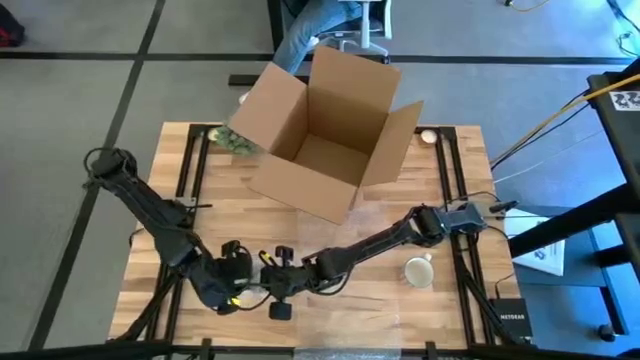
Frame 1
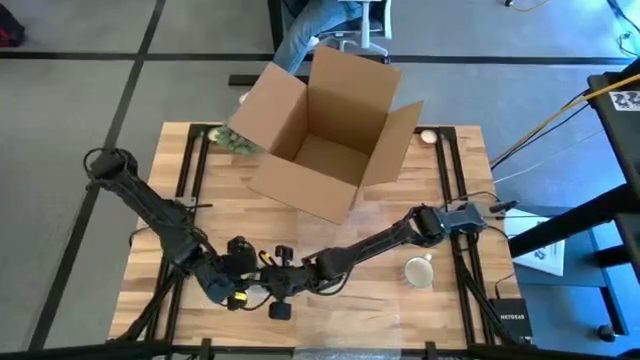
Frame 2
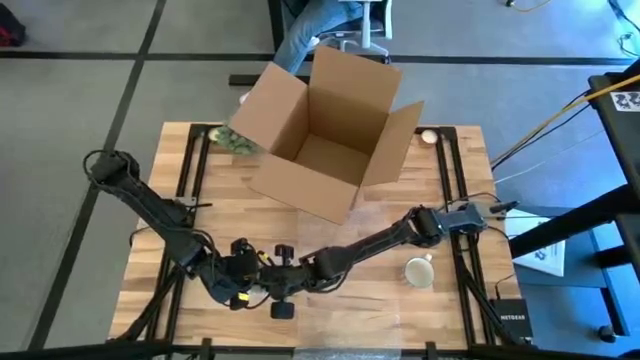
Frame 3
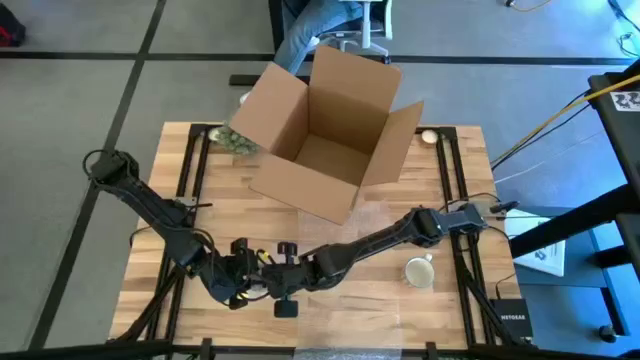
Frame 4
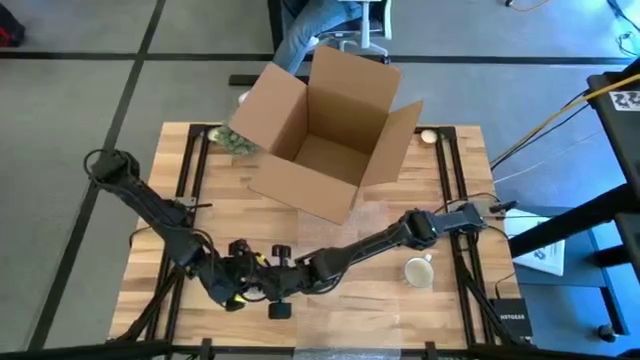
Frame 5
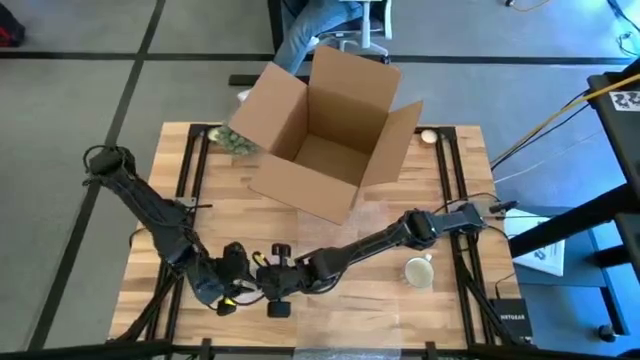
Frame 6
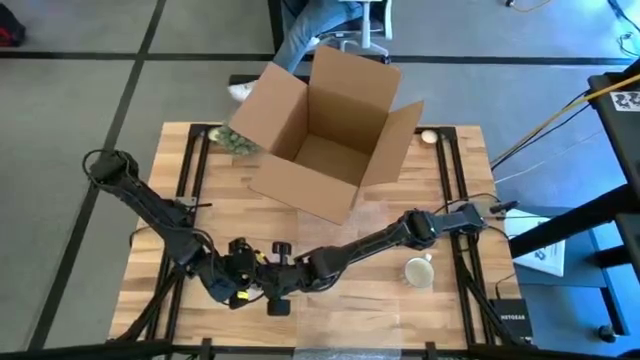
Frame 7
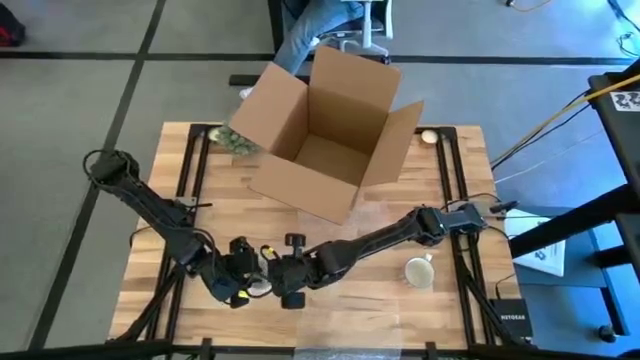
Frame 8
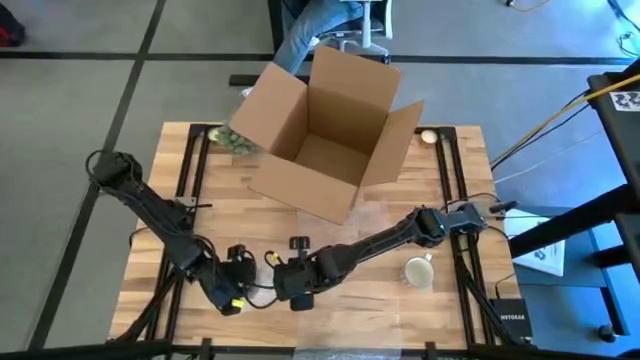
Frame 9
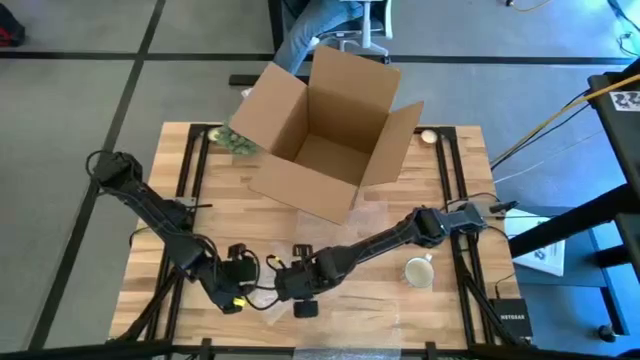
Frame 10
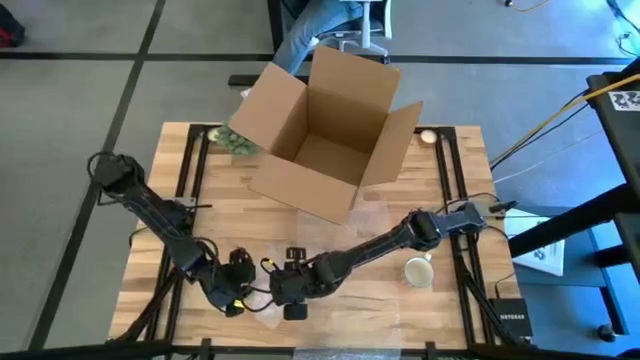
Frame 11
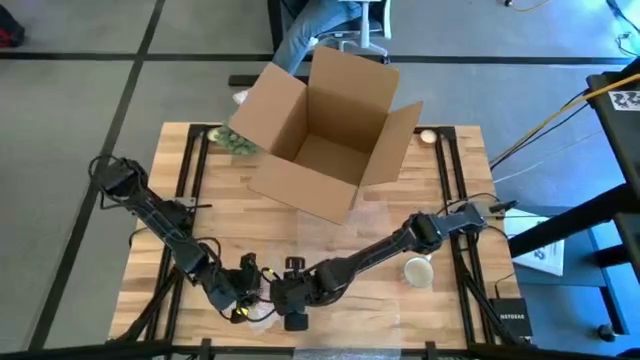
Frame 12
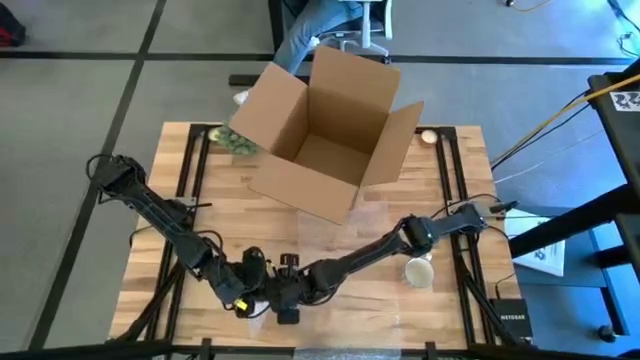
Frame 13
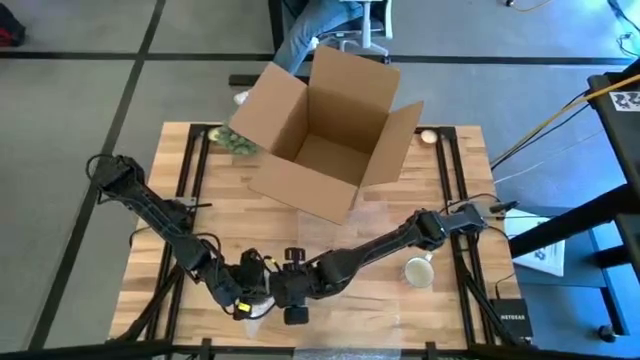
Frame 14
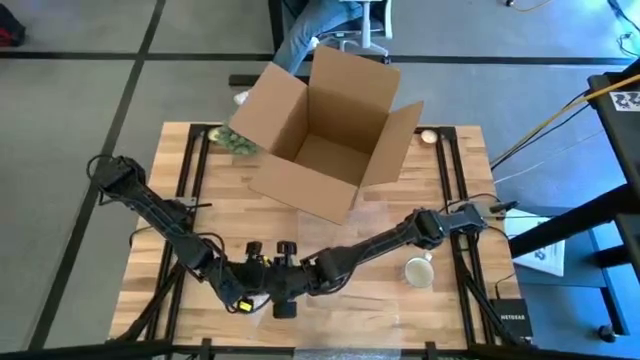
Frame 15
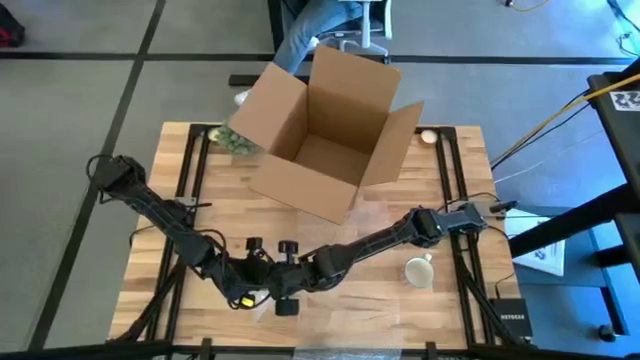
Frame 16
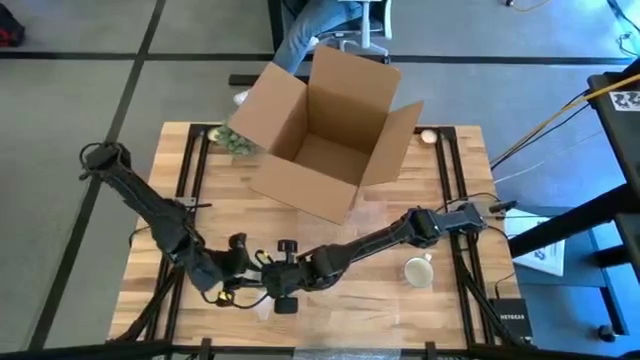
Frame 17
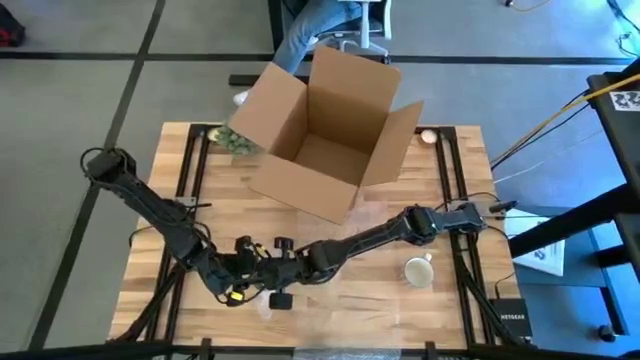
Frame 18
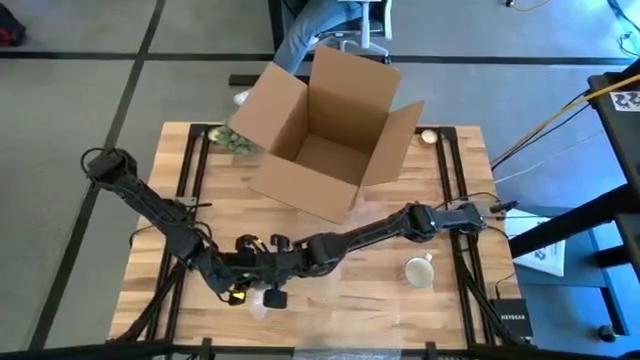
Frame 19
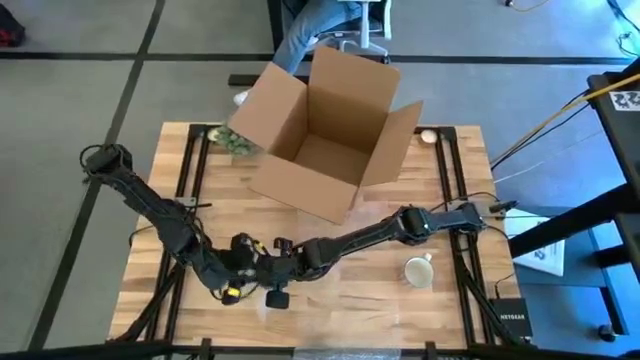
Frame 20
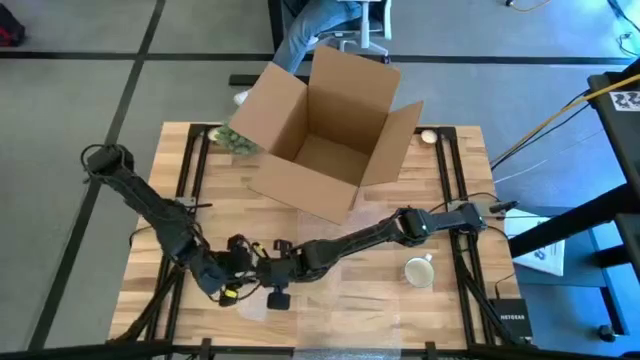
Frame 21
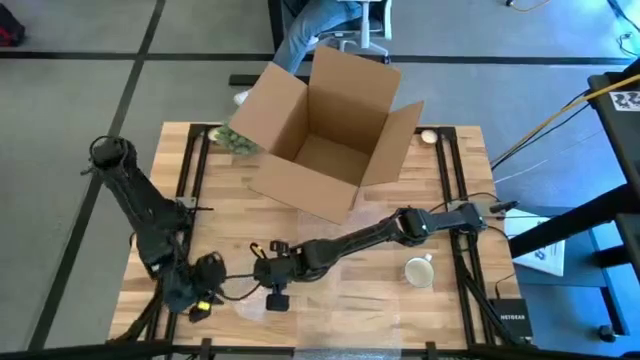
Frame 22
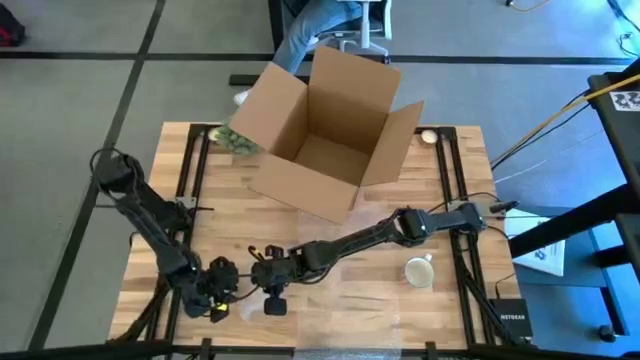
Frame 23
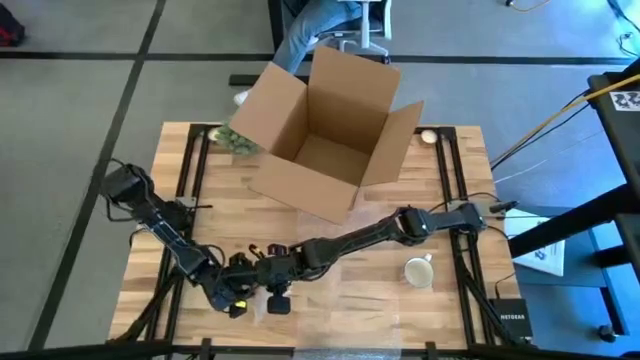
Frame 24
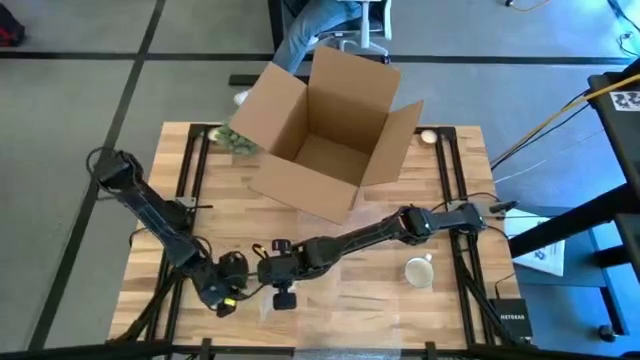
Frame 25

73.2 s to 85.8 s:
Task: wrap mug
Wrap the orange mug with the left bubble wrap

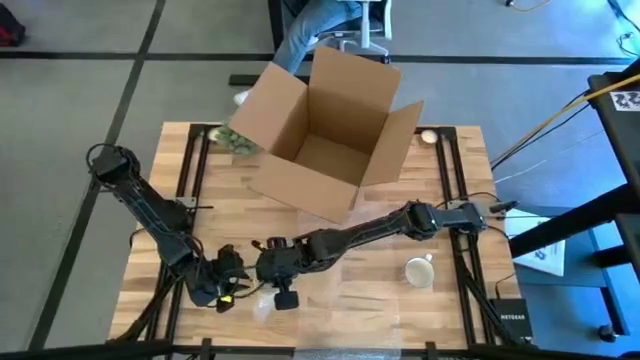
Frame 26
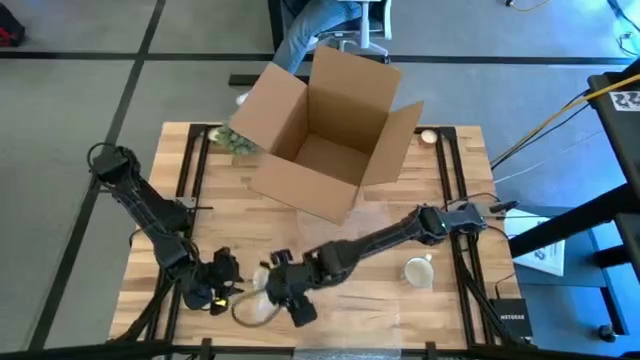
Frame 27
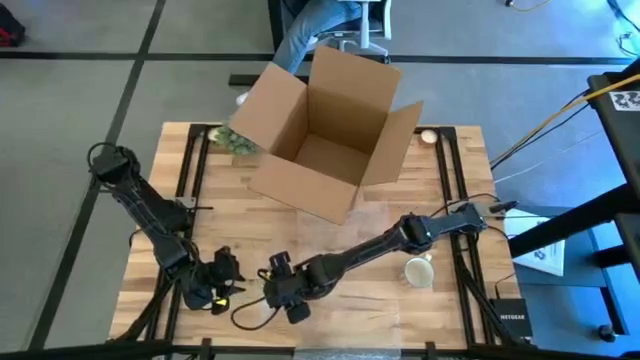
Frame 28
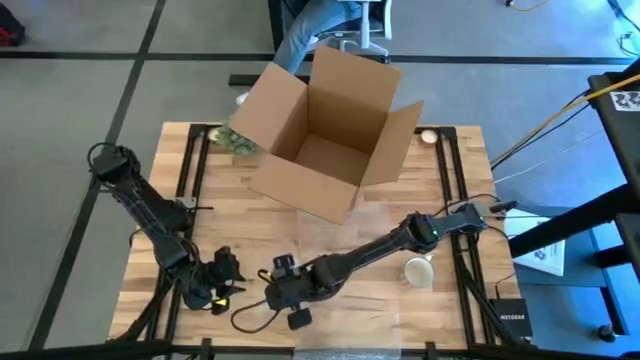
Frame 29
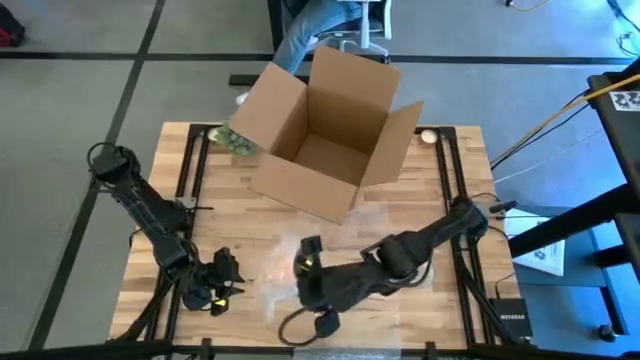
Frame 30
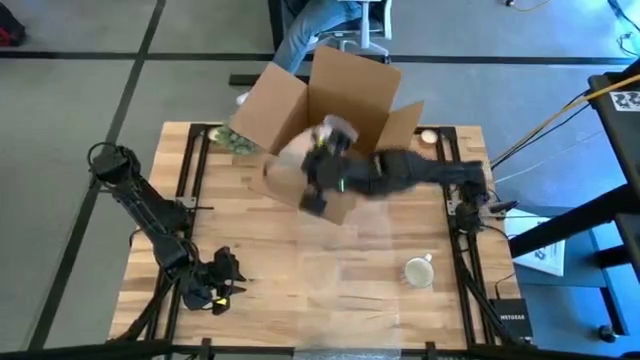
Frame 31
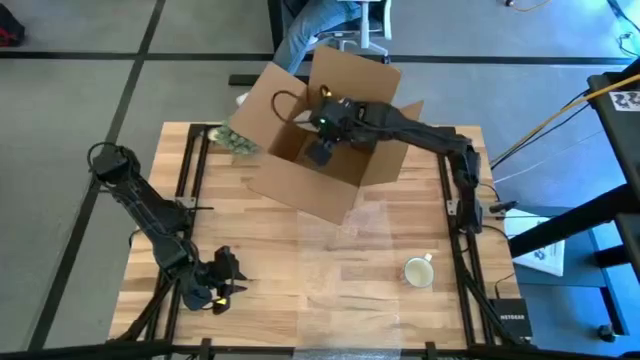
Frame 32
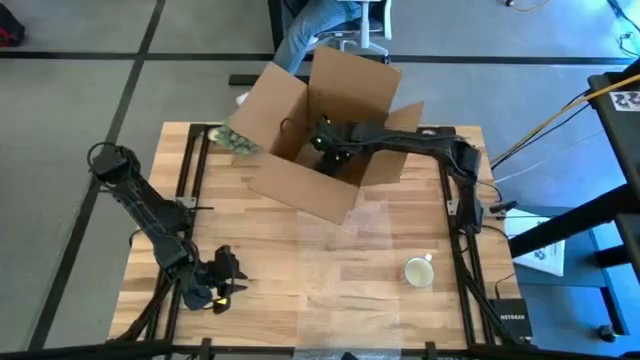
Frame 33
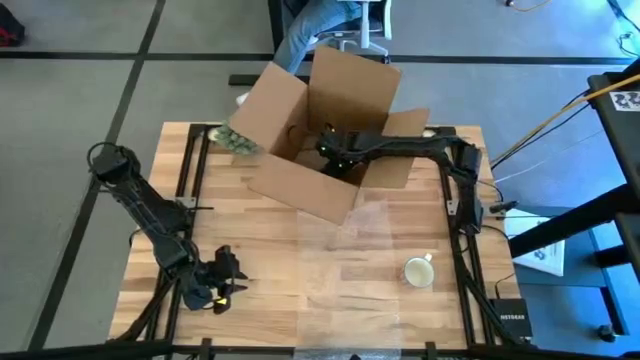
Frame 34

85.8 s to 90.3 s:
Put the wrapped orange mug into the box

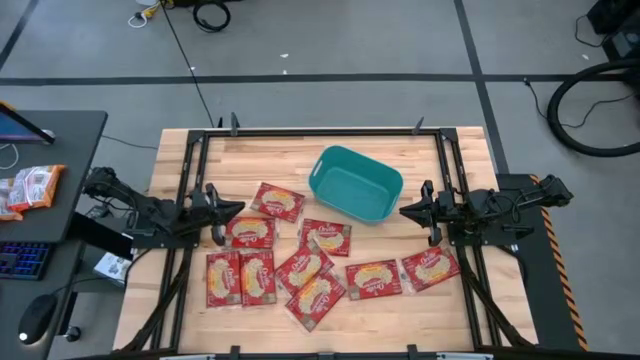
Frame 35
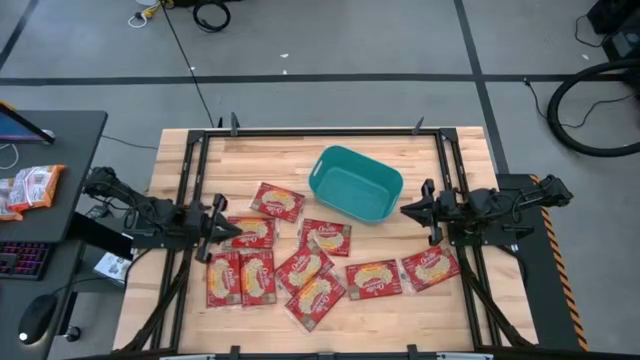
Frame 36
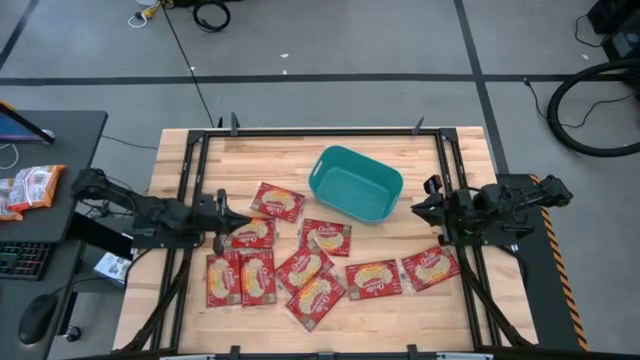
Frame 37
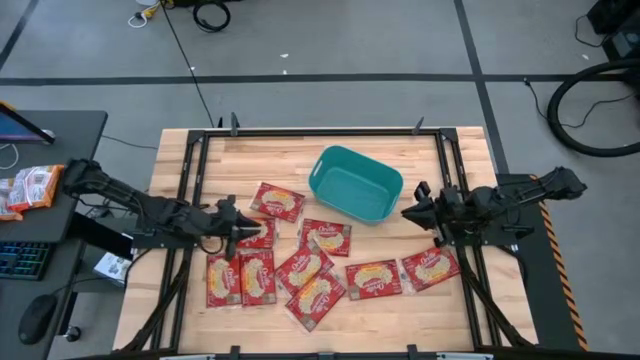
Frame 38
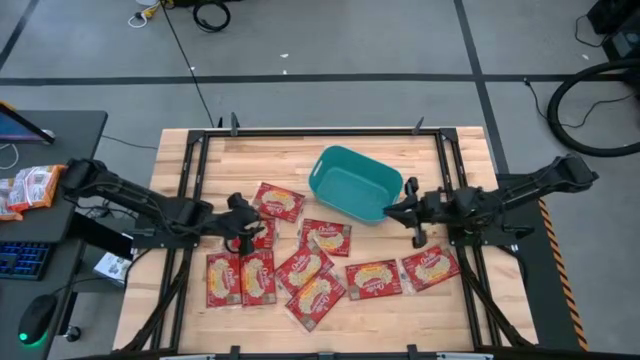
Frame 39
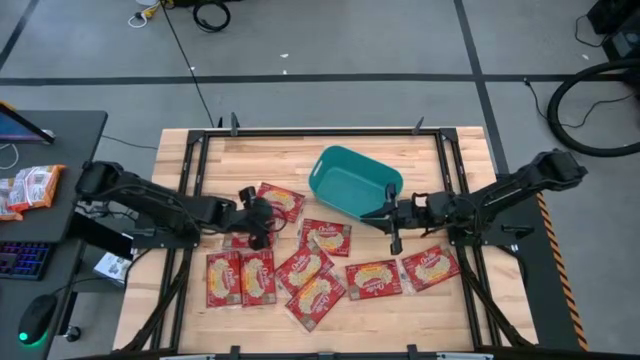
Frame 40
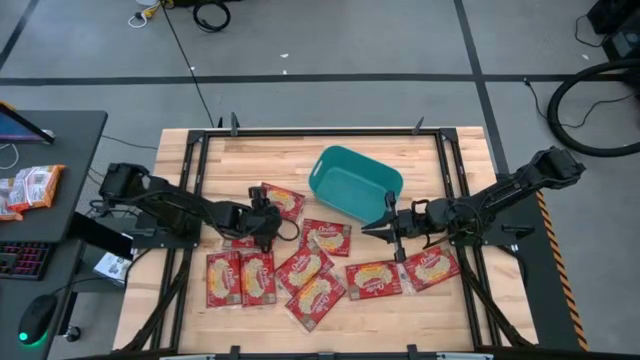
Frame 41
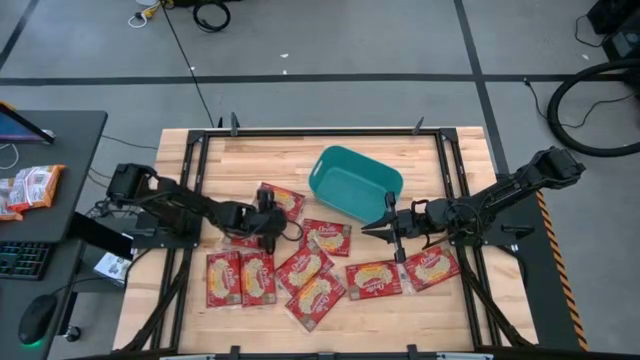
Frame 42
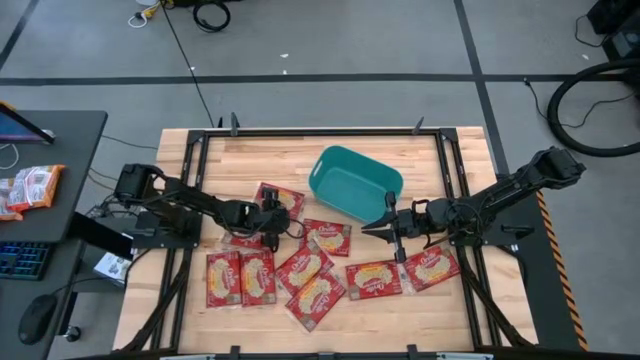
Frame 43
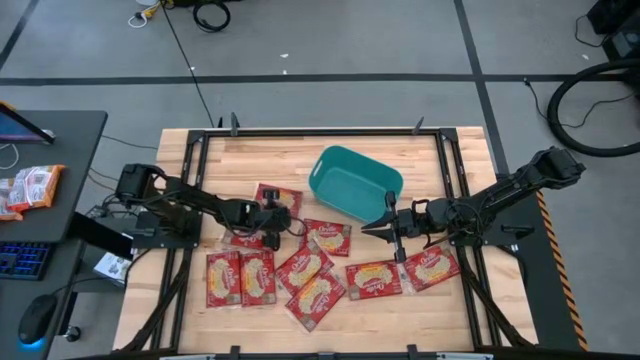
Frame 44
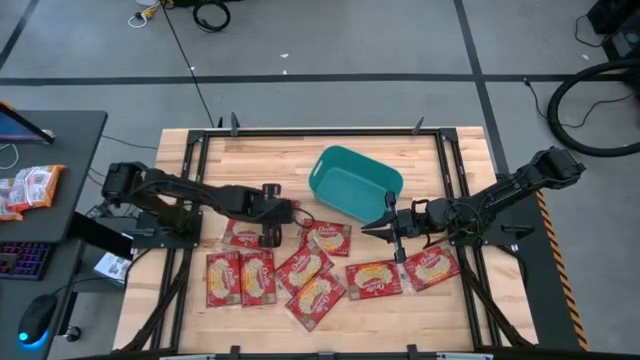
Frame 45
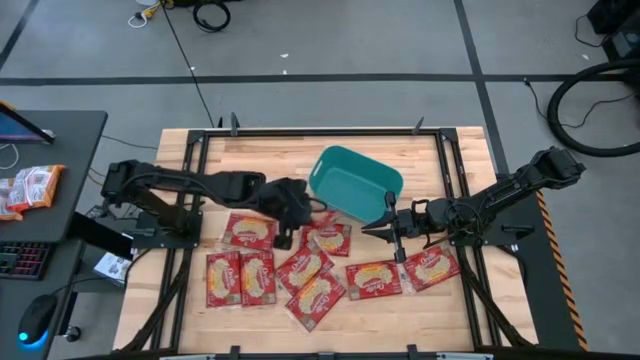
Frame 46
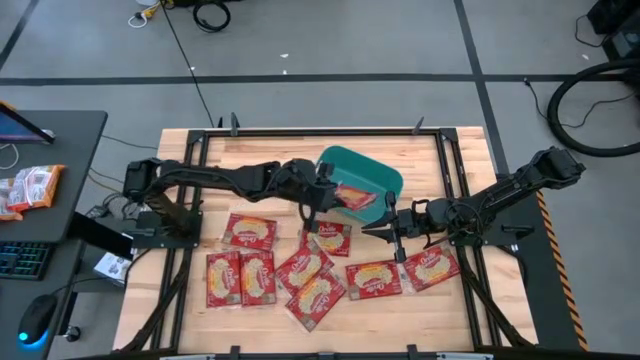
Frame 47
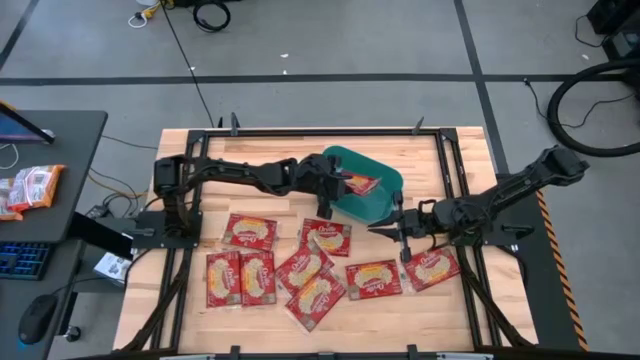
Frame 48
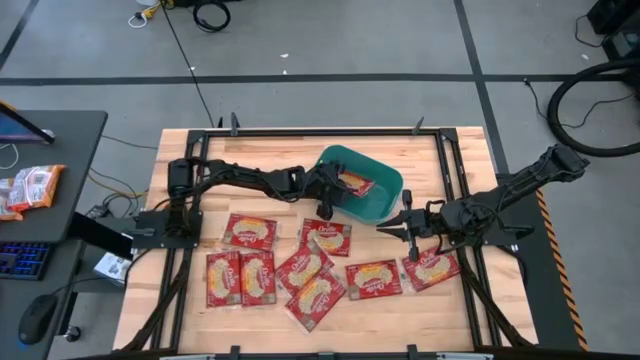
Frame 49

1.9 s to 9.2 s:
Task: Sort popcorn bags into baskets
Put the red popcorn bag into the green bin
